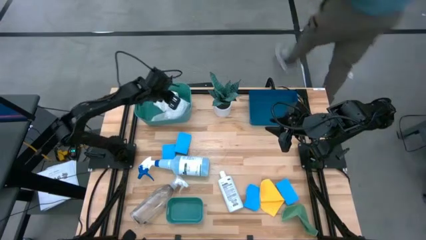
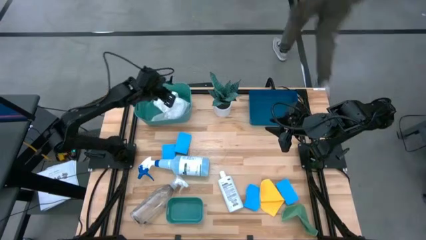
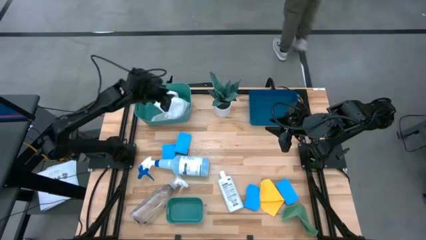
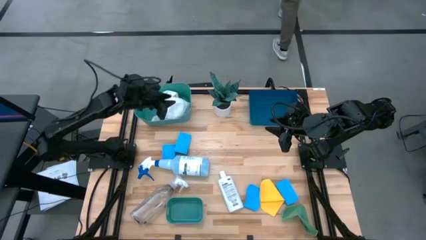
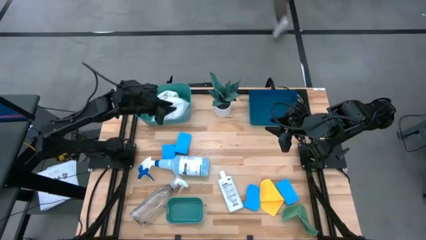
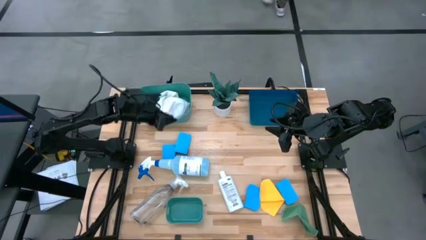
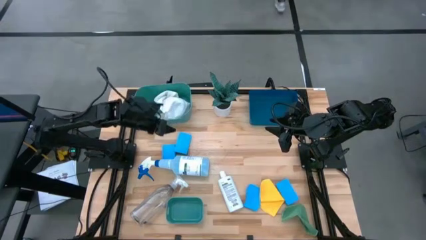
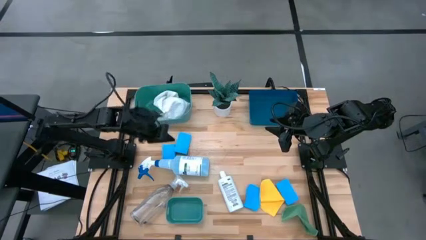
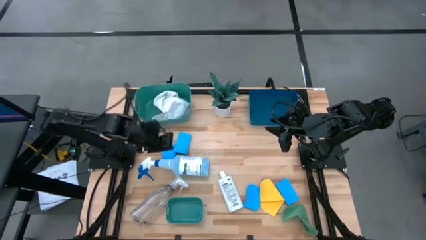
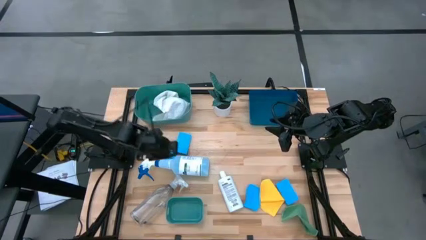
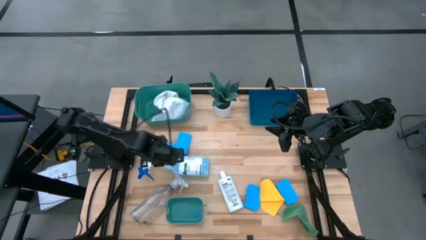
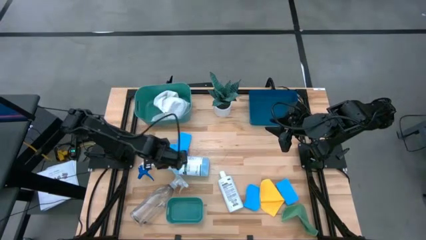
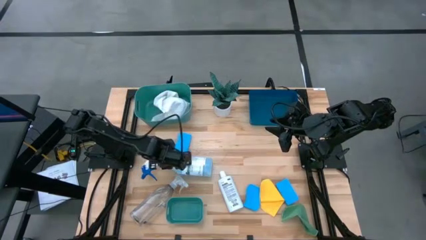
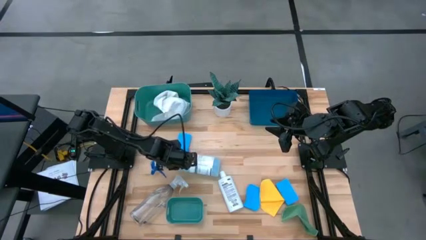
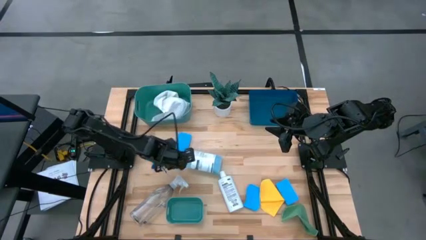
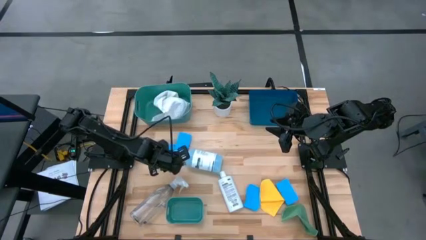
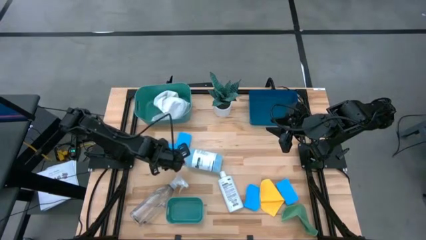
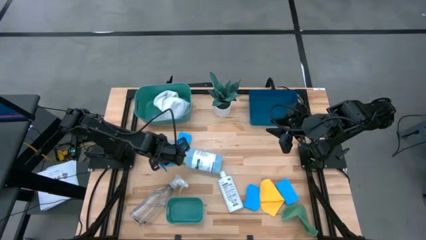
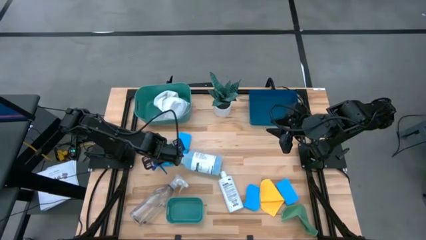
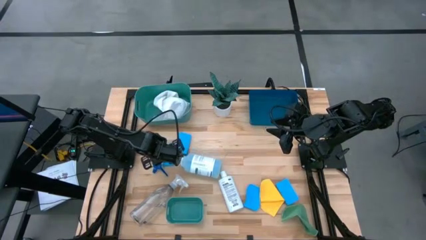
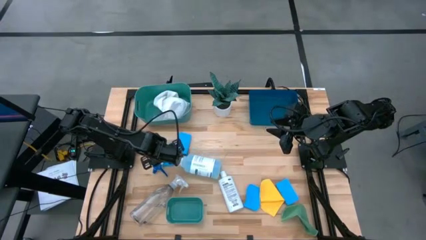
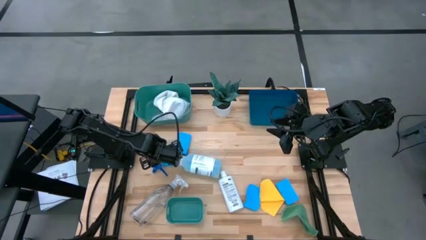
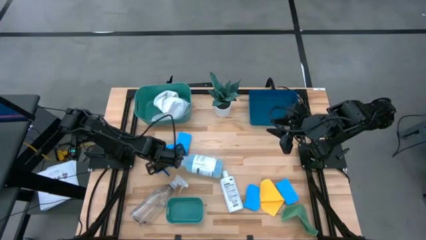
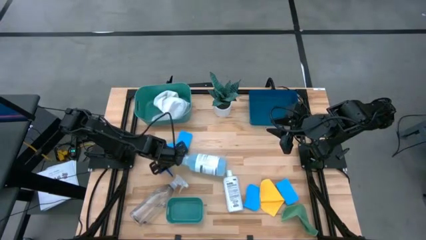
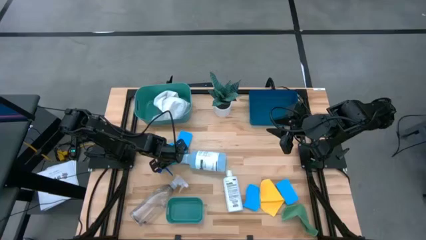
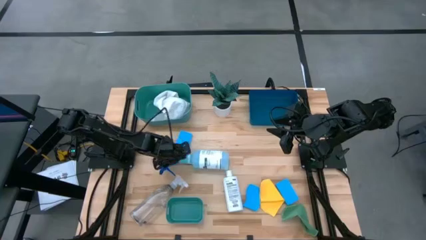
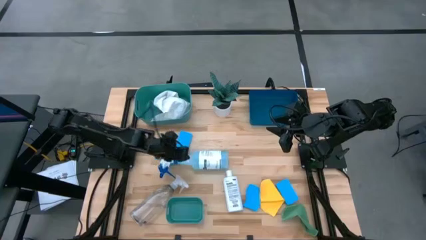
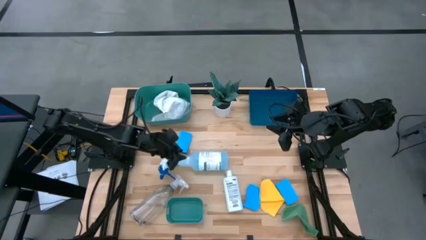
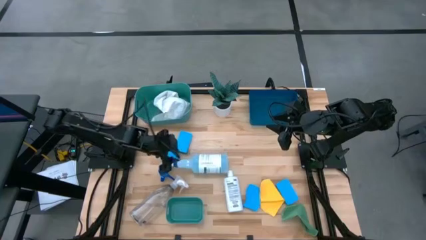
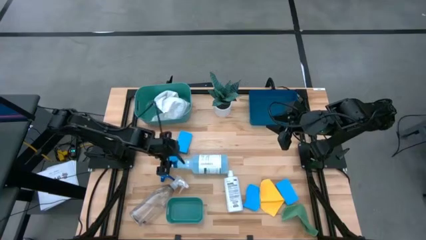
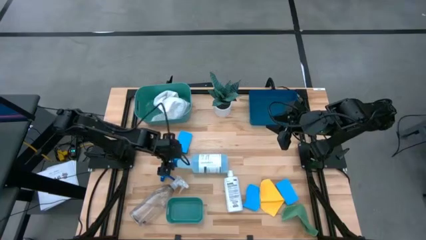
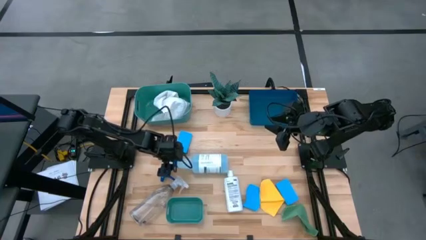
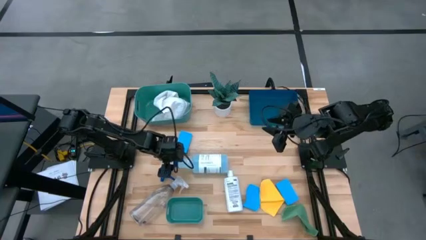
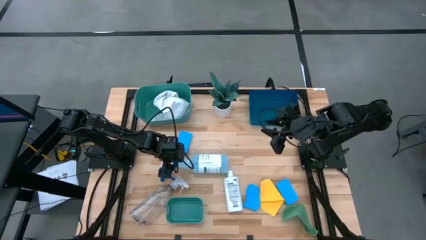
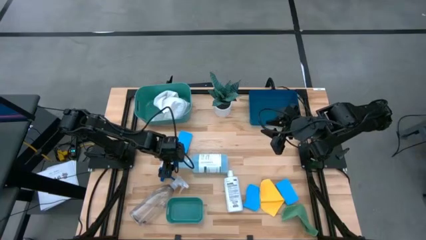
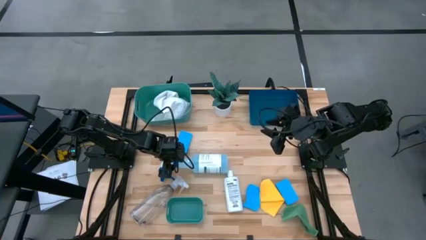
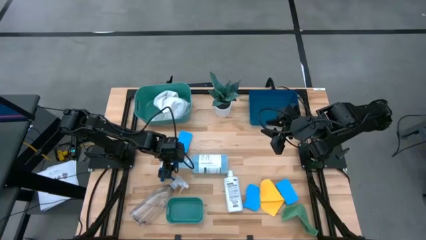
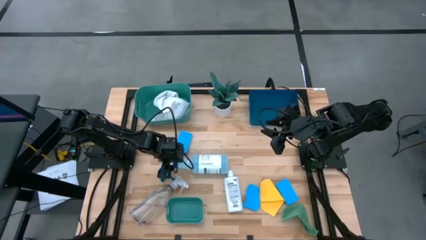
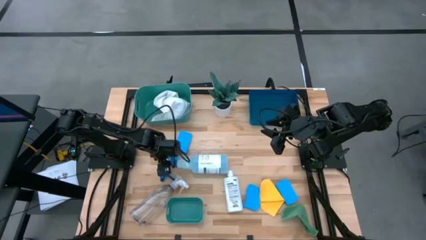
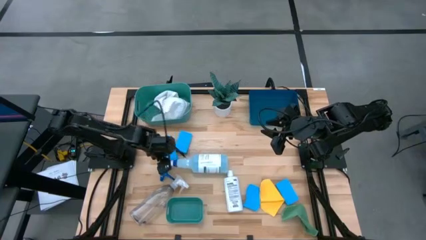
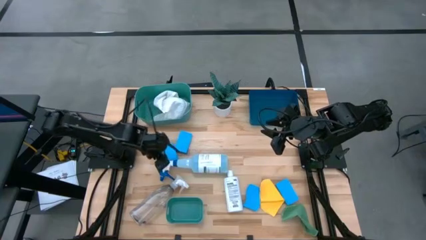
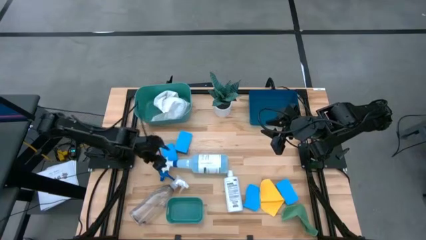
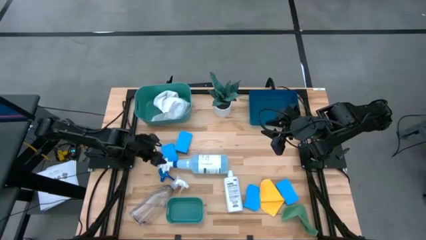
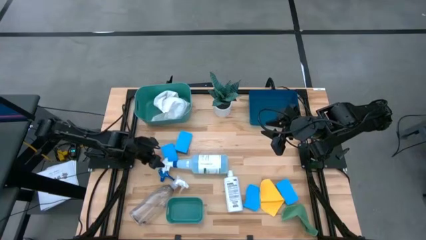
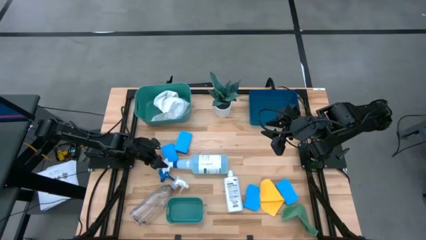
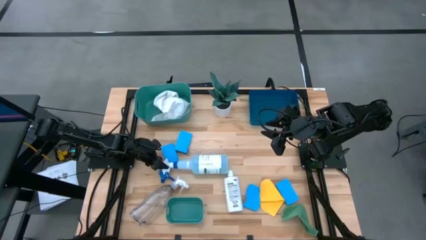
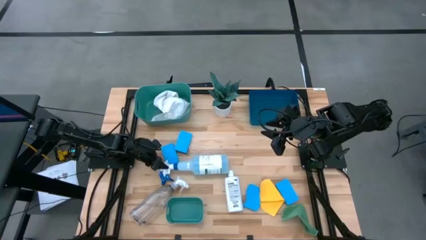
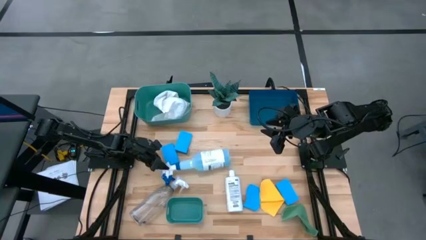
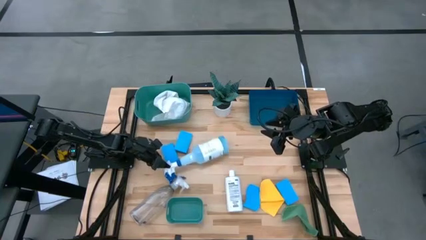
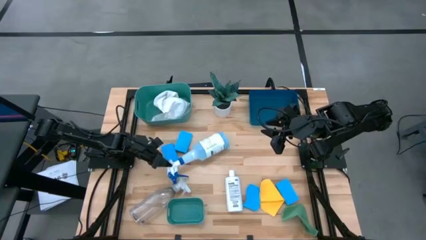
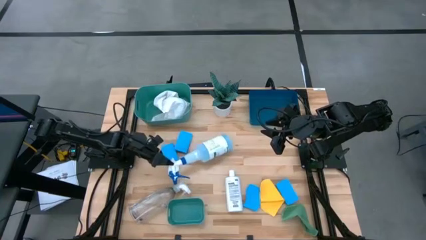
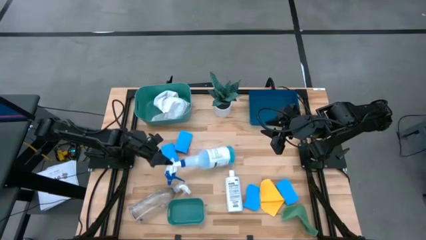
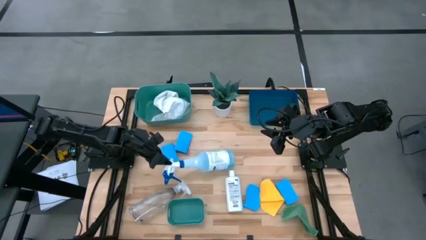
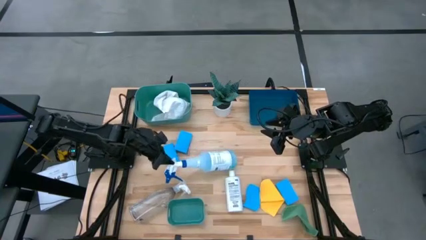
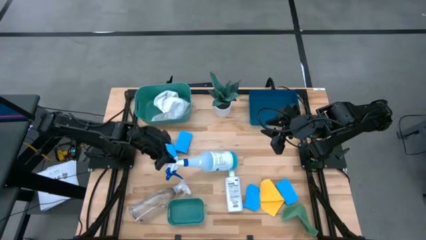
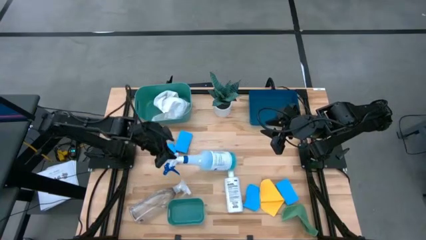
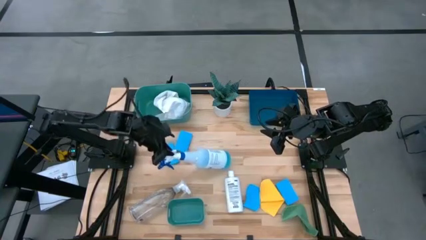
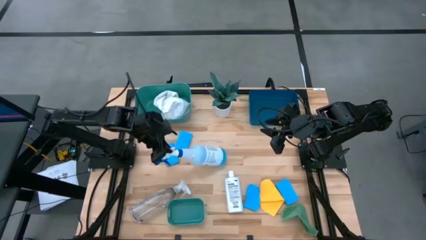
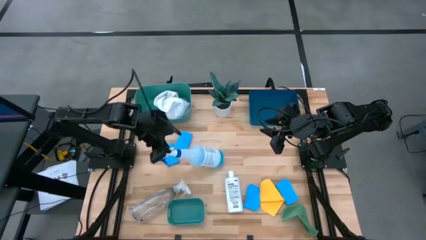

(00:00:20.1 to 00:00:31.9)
Task: Pick & Place Kitchen Items
Put the white spray bottle into the blue bin

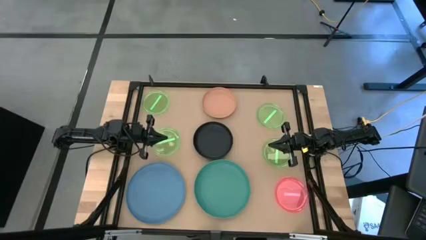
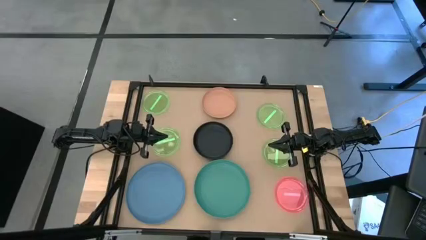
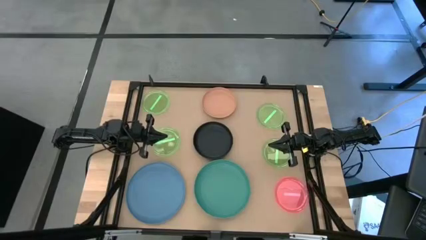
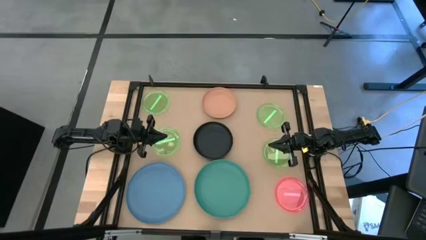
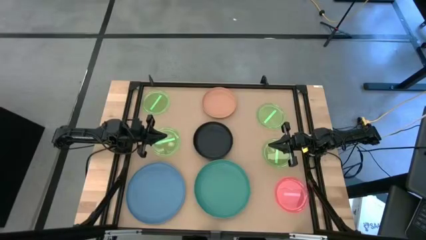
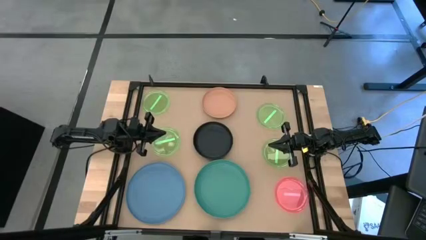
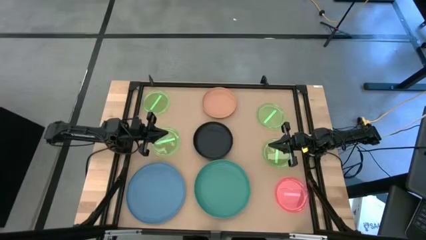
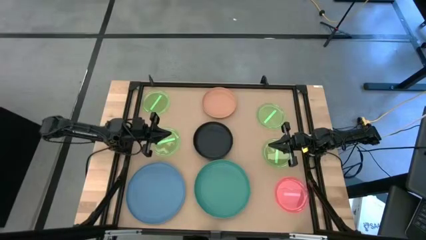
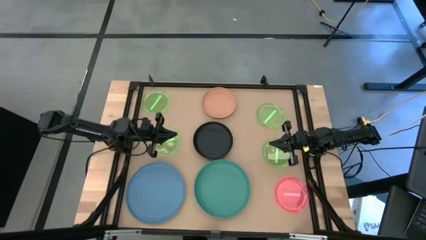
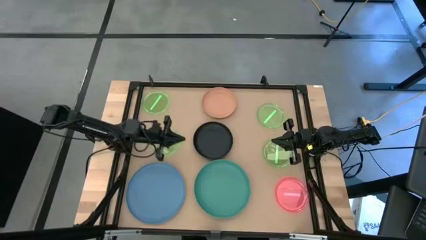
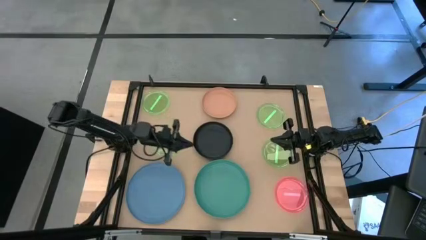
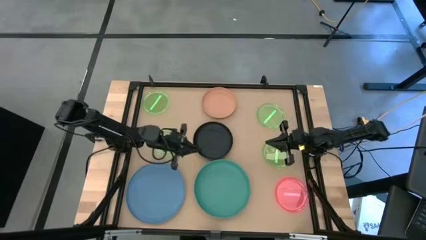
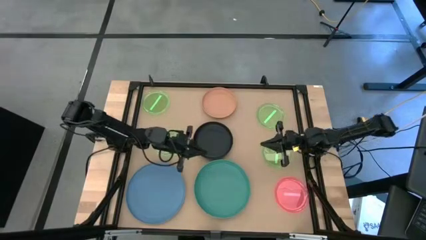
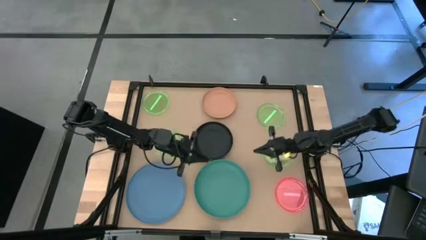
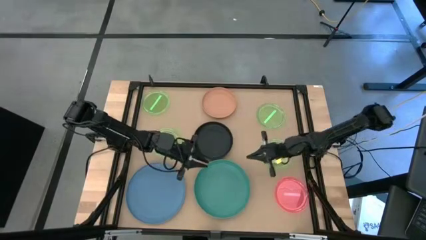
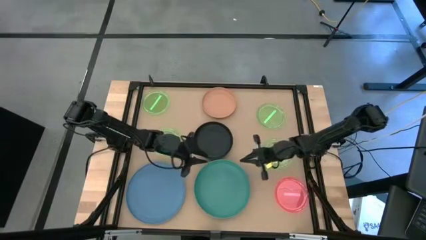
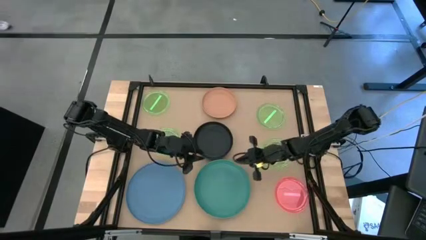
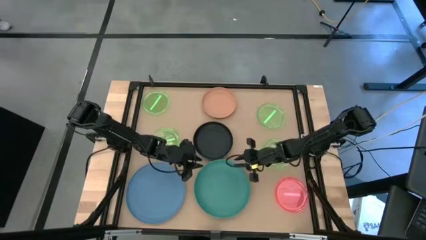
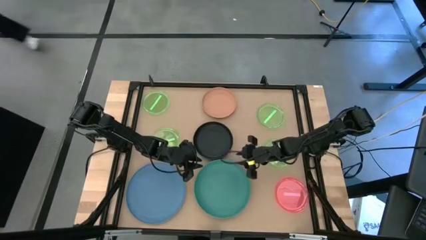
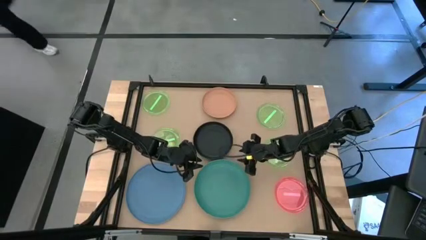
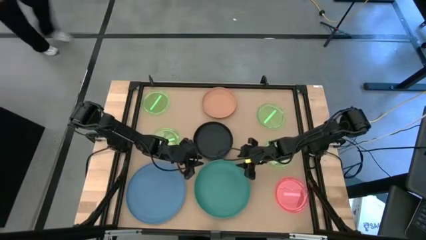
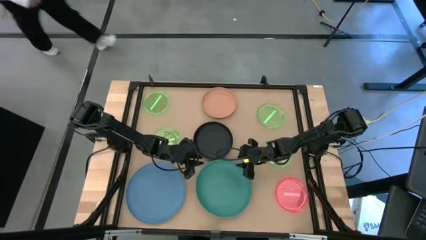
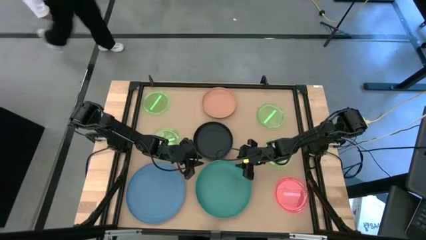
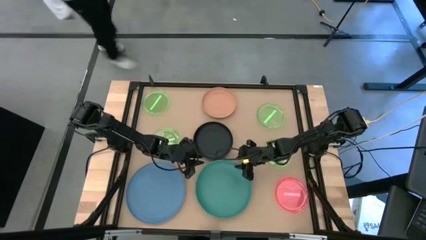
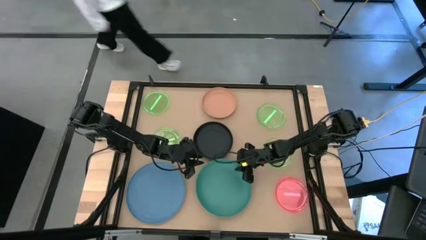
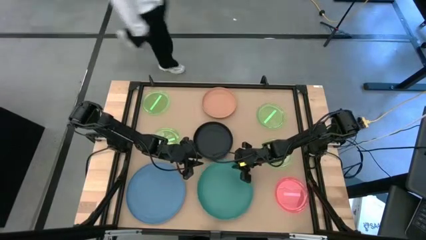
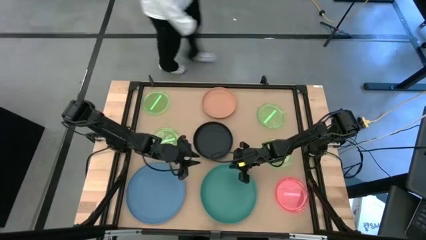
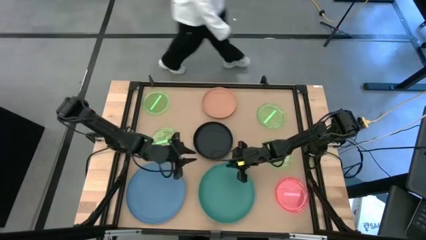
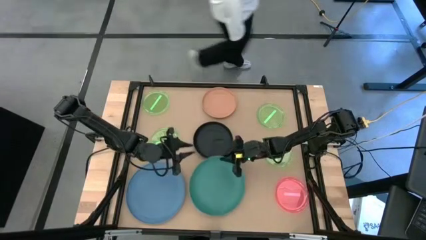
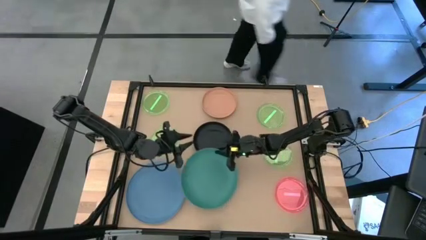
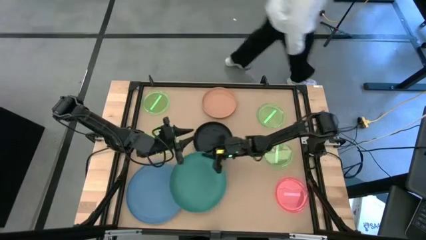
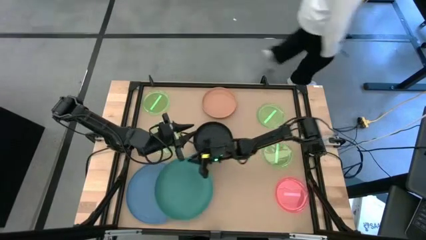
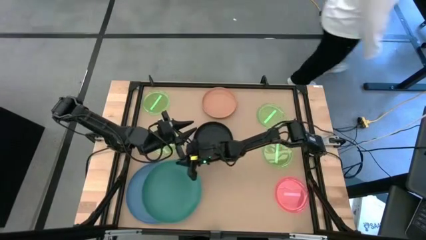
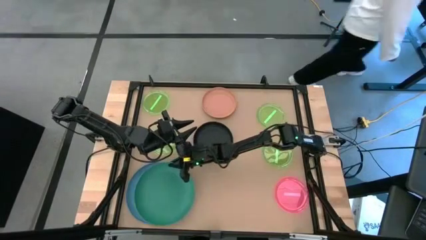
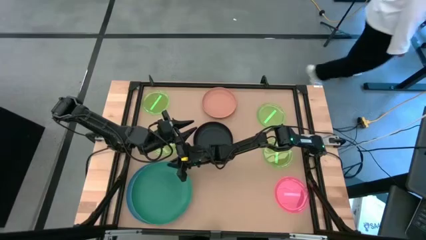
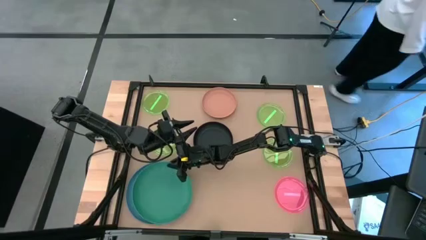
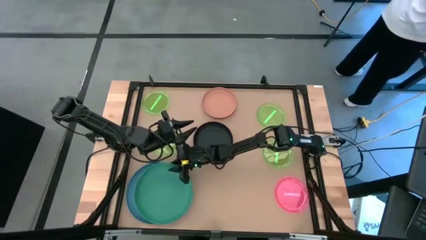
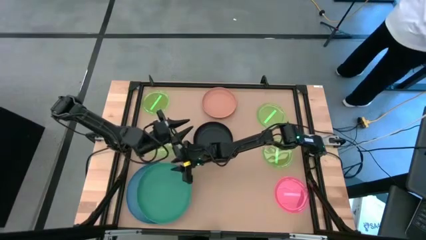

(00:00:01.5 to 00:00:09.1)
Task: Stack plastic plates
Stack the dark green plate on top of the blue plate
